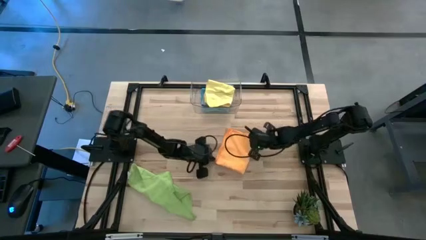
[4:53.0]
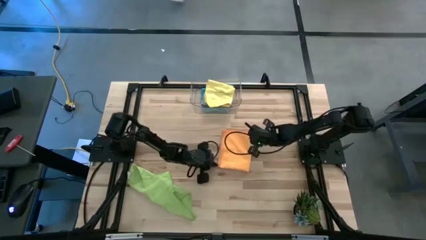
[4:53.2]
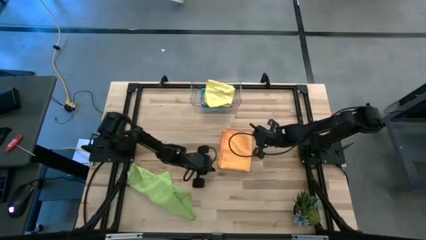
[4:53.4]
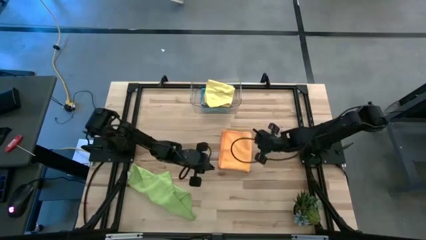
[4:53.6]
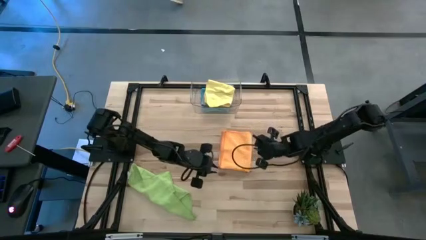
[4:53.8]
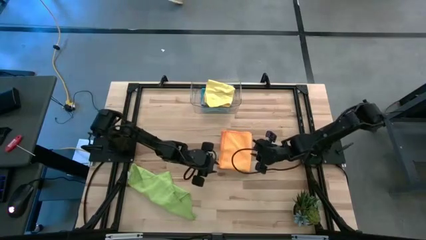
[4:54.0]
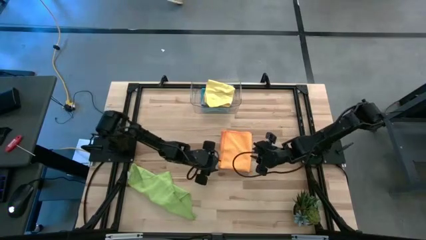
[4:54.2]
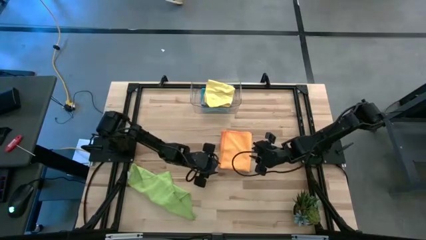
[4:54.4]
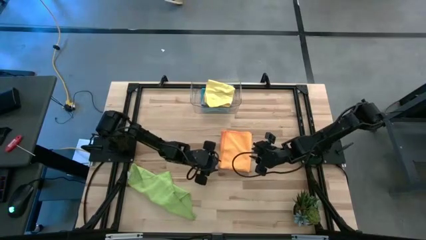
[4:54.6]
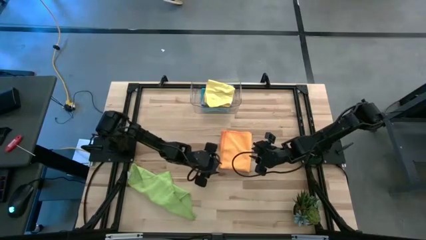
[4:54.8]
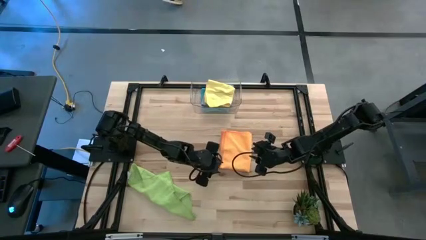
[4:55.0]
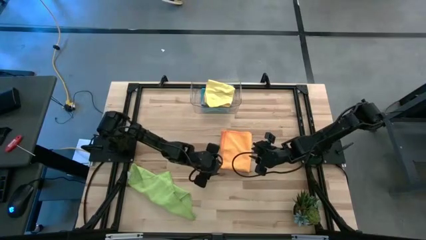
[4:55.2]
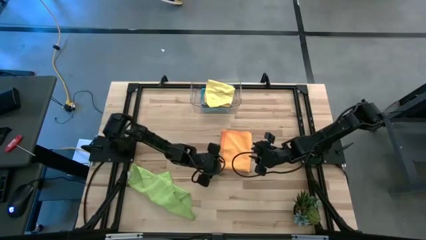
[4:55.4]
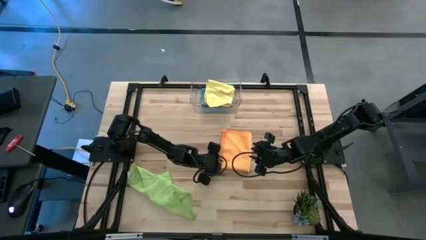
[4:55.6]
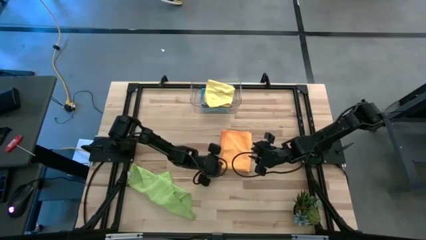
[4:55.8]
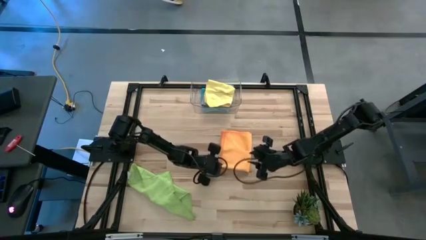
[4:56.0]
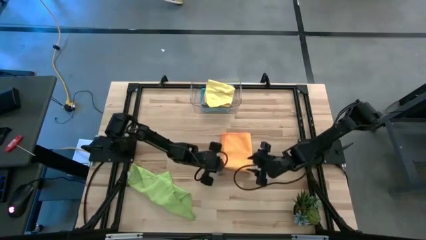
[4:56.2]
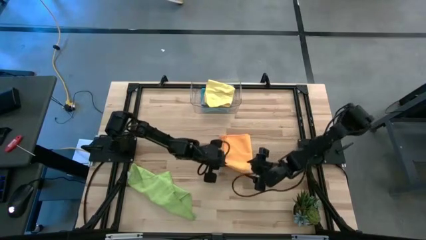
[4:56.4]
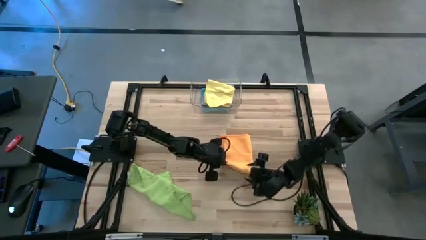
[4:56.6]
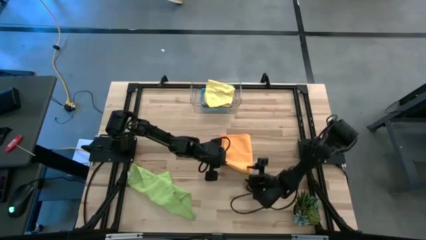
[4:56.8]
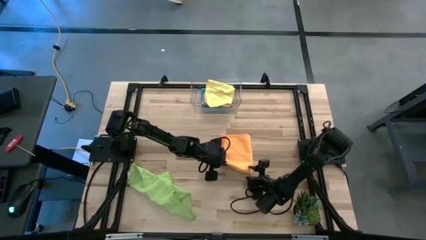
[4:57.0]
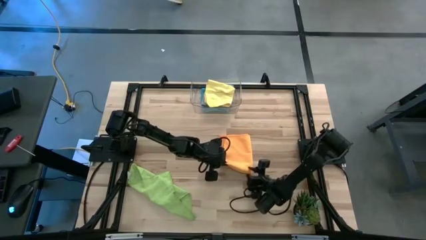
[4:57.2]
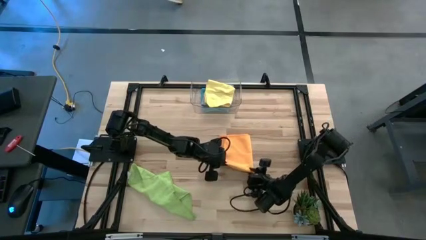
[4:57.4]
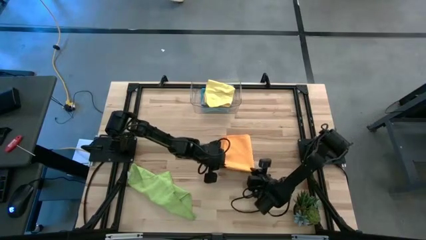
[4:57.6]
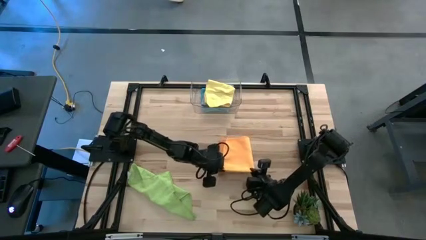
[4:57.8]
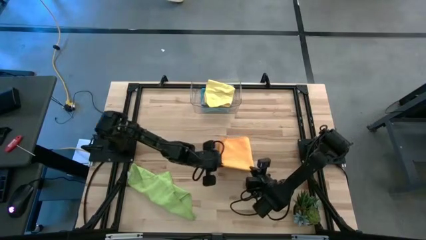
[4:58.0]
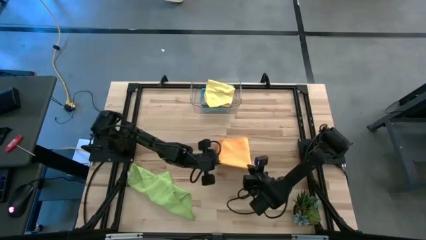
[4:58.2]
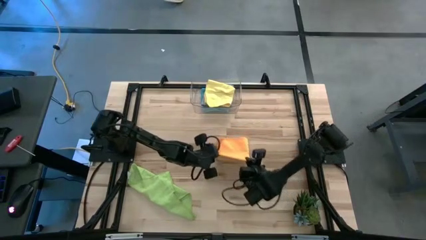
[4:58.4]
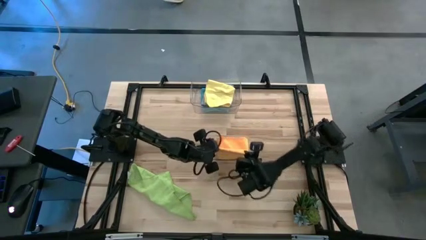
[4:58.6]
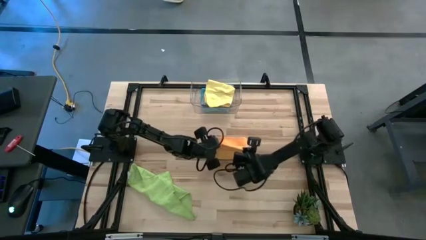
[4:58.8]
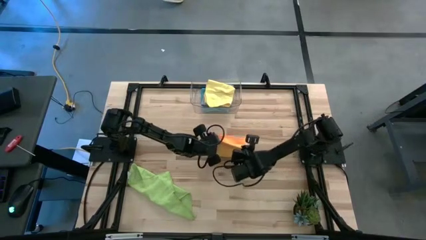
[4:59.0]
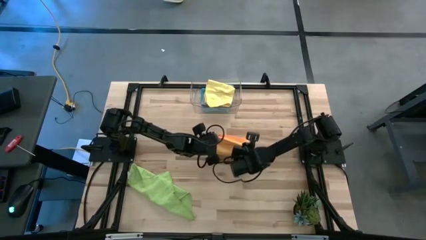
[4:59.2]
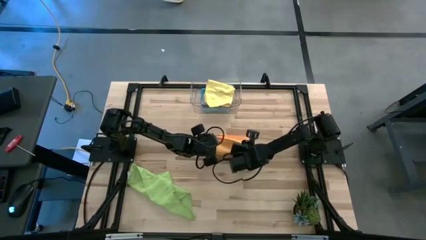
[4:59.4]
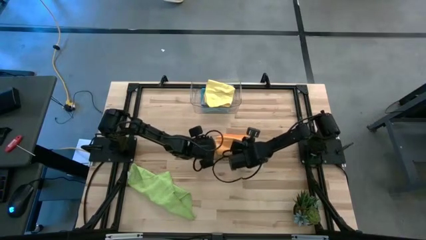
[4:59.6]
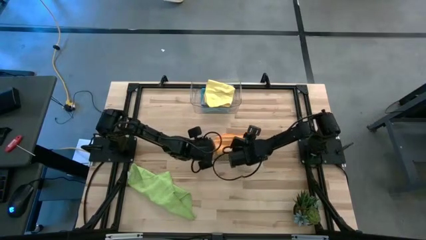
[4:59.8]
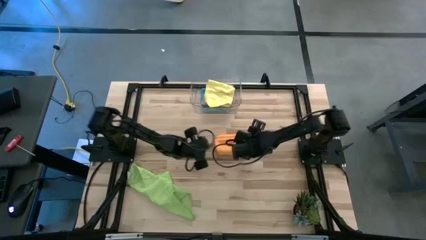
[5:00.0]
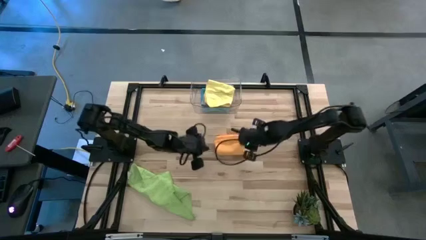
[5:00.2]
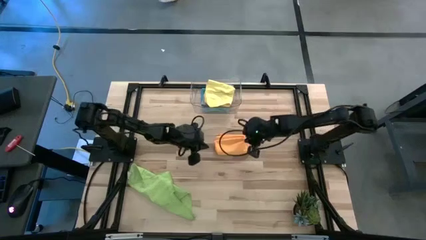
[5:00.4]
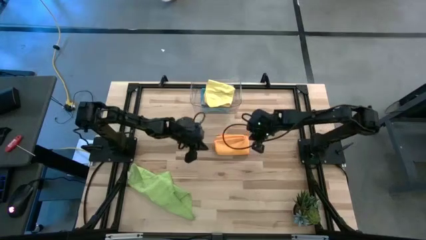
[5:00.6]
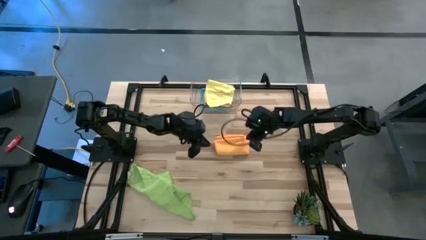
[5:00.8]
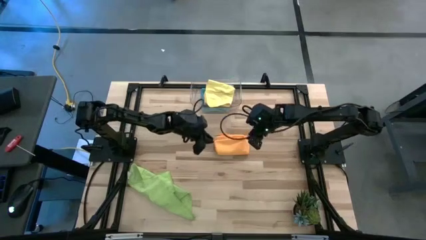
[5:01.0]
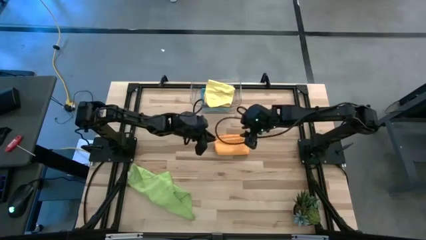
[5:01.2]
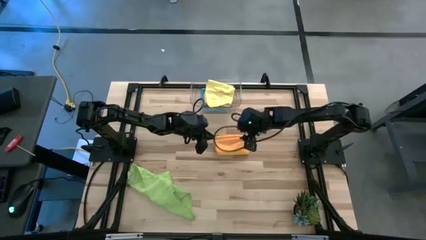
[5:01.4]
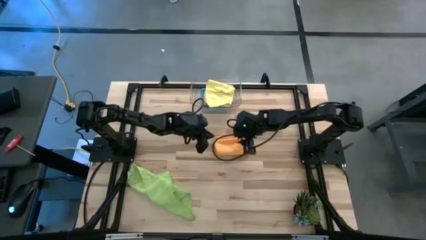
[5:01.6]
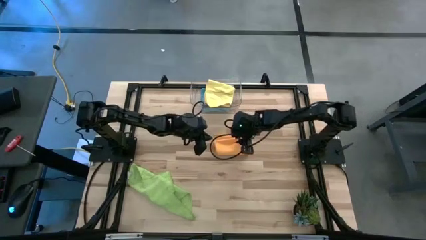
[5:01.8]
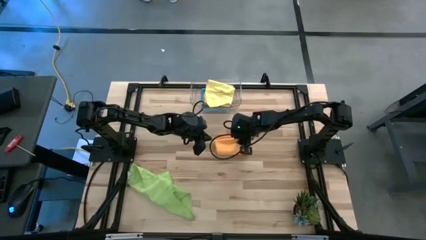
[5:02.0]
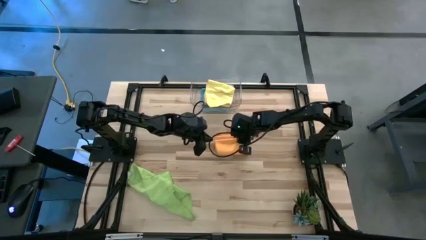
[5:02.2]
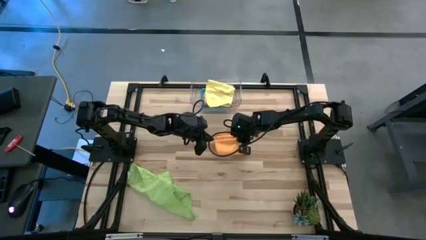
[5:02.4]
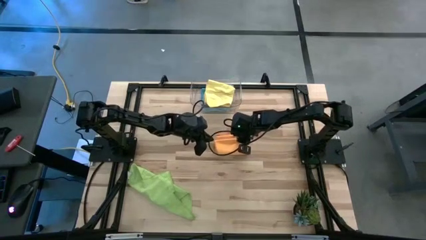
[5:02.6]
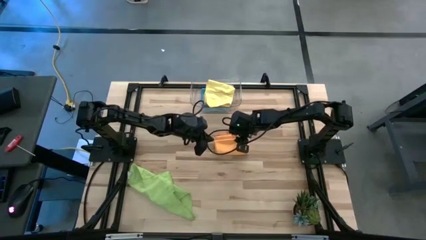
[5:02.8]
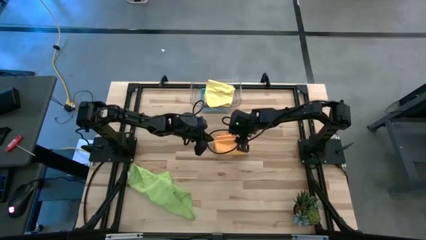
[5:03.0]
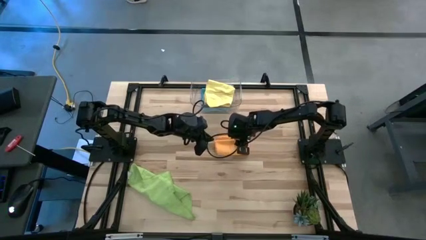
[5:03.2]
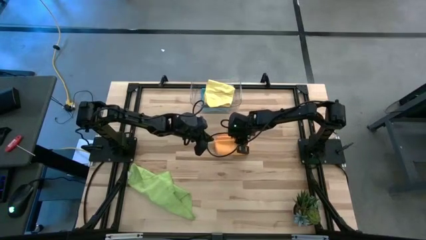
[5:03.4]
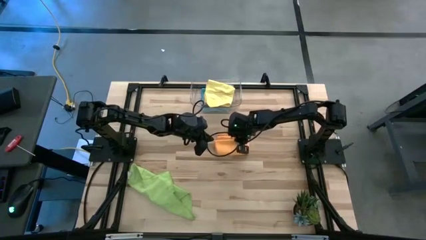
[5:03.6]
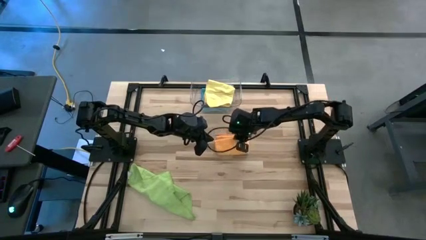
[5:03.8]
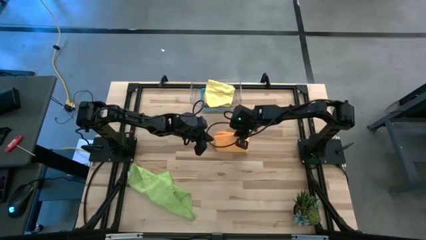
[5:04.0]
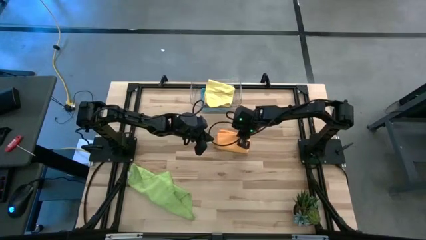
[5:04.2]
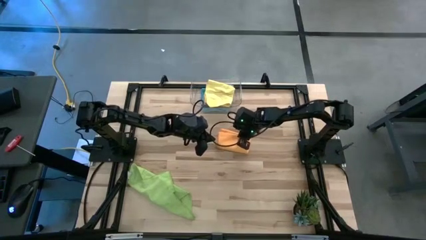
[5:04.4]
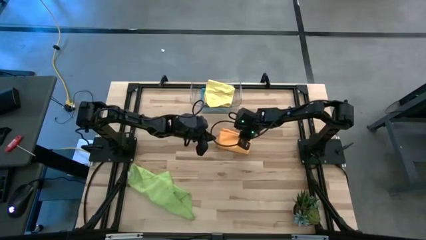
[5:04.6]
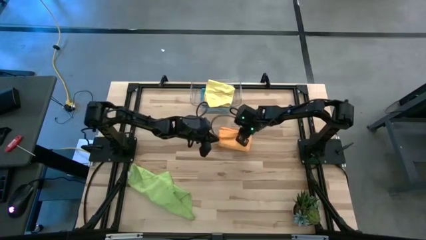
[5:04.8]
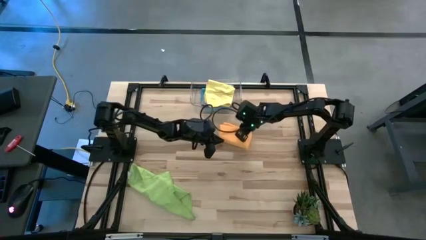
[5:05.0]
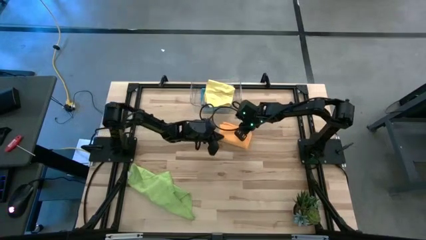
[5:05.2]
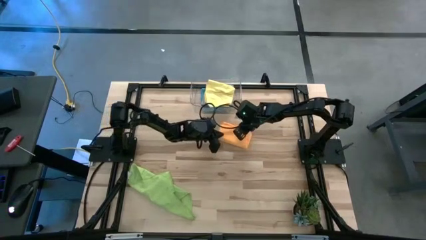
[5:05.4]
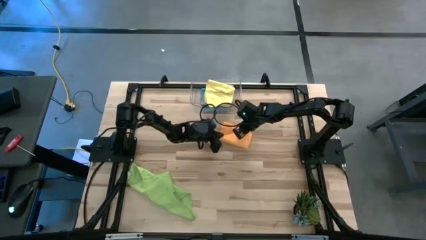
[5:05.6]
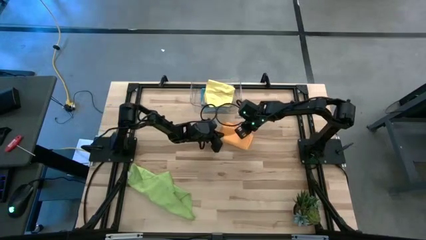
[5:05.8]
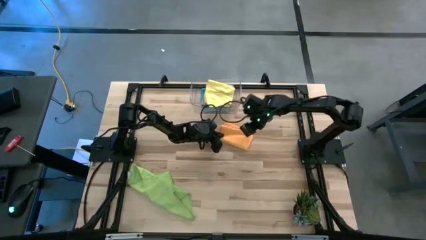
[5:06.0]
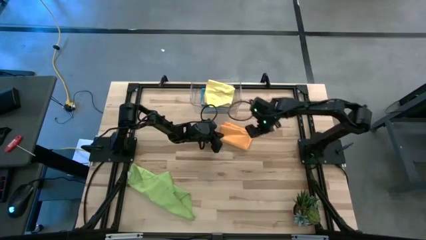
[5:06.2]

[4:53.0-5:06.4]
Task: Fold microfiber towels
Fold the orange towel

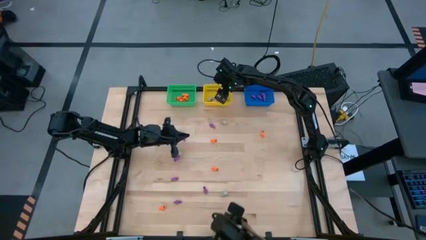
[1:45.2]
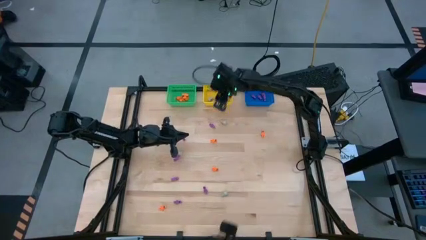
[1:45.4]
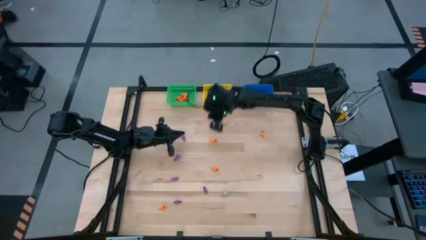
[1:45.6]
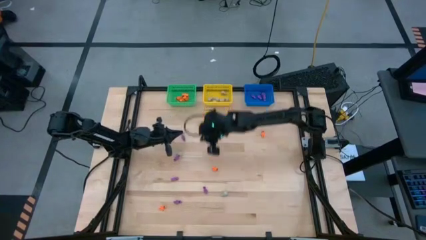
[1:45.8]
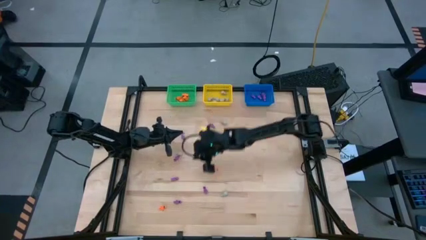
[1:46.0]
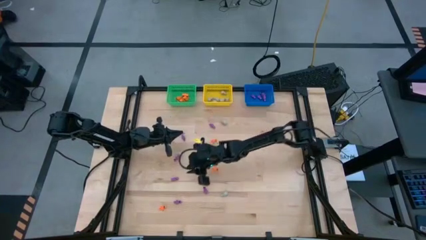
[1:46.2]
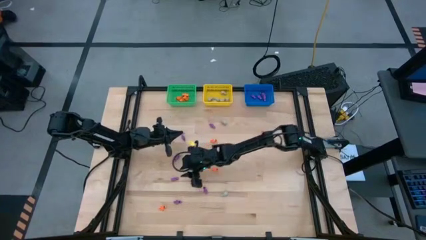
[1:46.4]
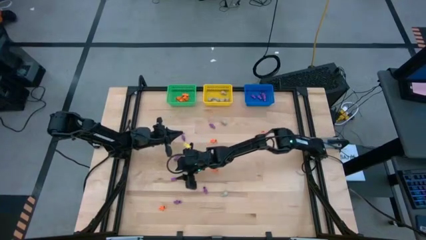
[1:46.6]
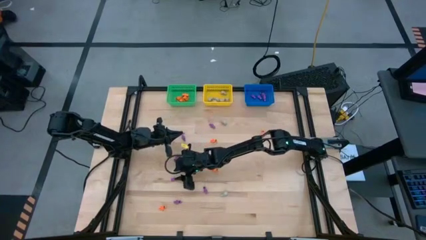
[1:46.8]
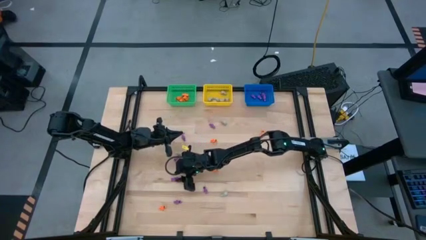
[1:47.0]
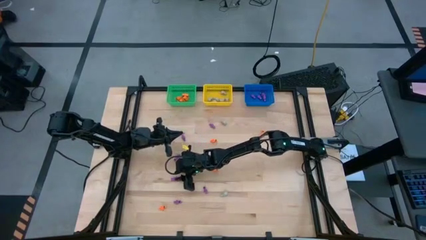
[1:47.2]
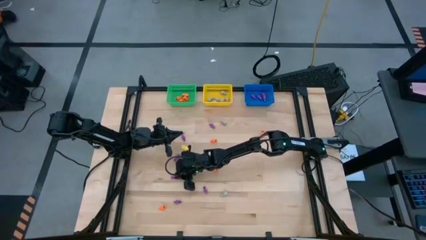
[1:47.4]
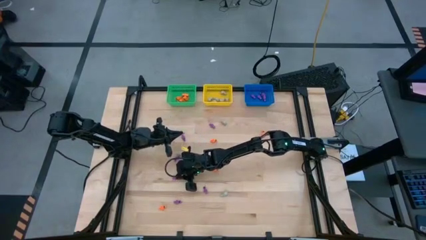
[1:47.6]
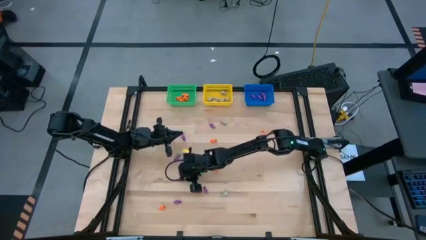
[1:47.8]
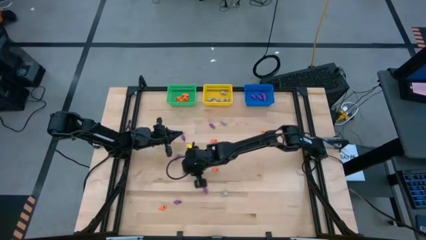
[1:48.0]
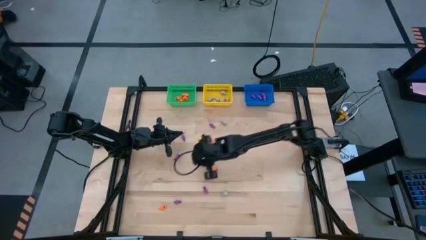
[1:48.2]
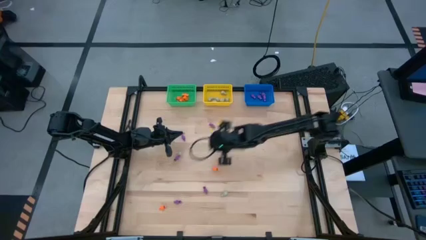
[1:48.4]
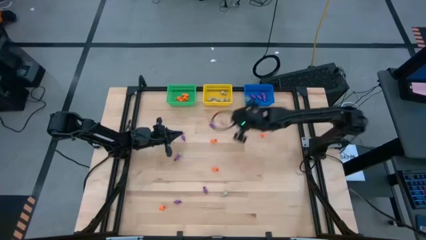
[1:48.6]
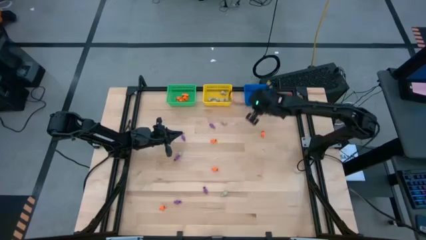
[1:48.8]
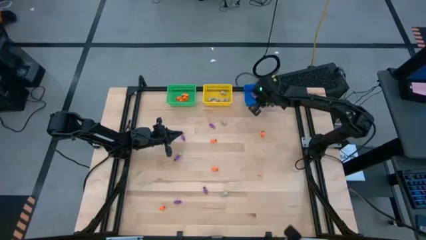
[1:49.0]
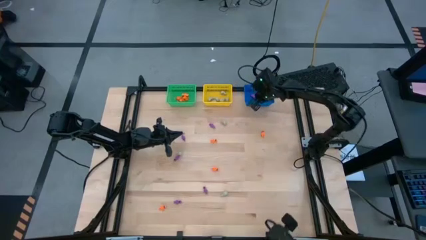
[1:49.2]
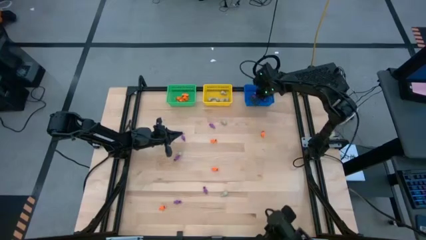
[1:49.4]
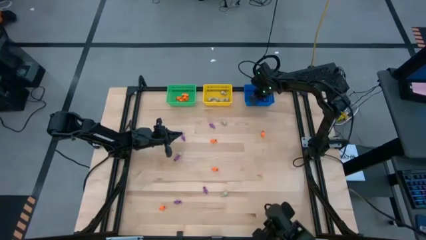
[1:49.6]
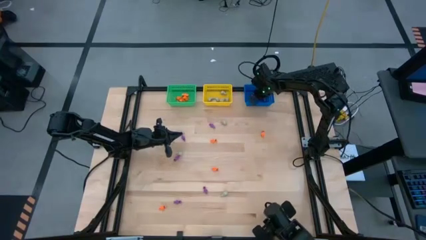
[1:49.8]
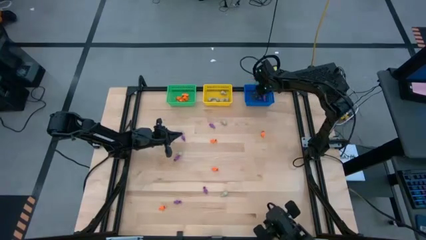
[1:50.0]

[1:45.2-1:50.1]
Task: Sort Halloween decoration
Put the violet skeleton toy into the blue bin
